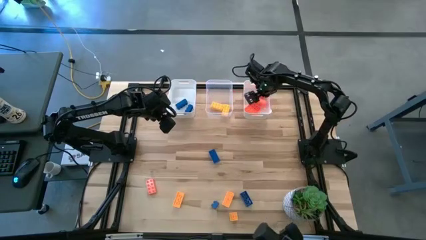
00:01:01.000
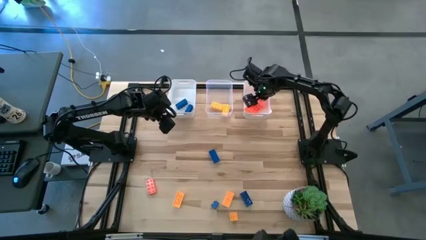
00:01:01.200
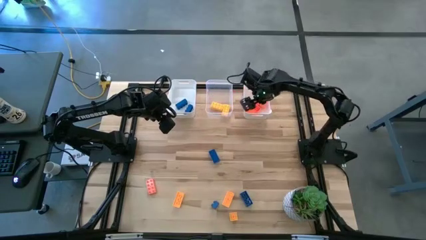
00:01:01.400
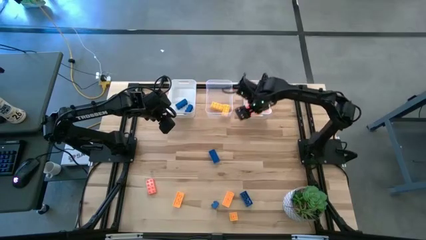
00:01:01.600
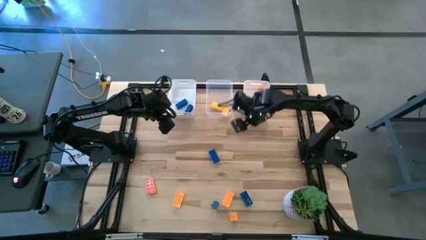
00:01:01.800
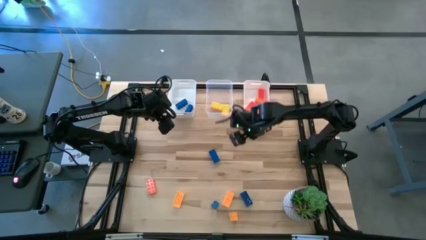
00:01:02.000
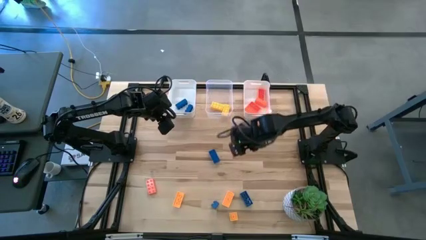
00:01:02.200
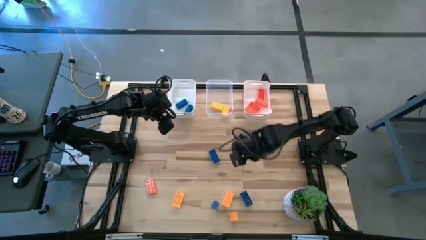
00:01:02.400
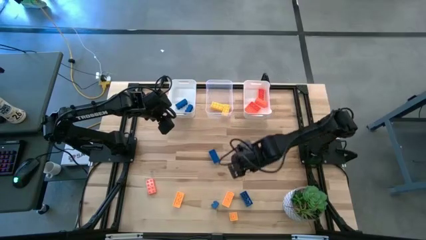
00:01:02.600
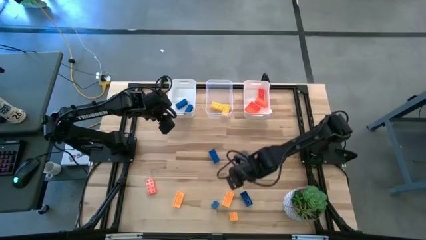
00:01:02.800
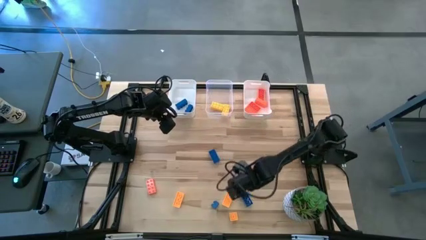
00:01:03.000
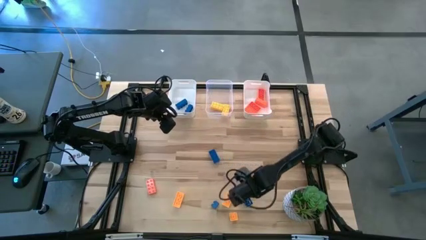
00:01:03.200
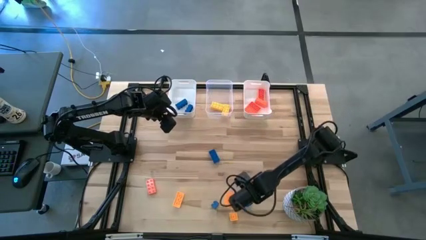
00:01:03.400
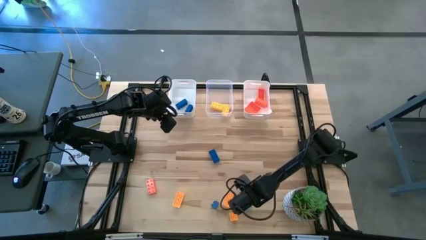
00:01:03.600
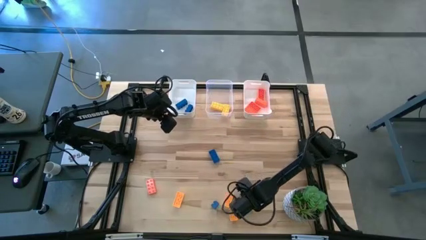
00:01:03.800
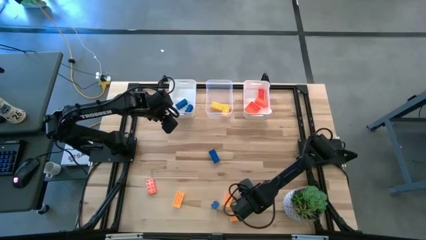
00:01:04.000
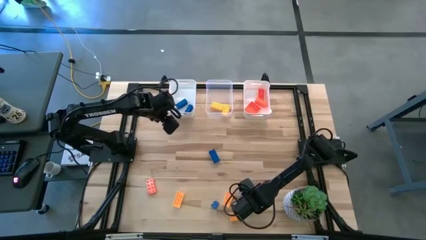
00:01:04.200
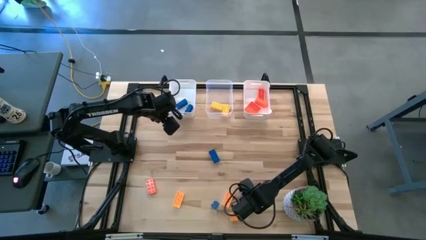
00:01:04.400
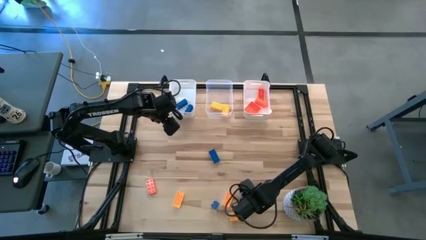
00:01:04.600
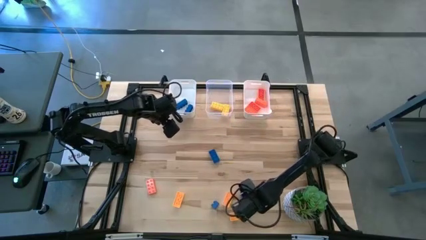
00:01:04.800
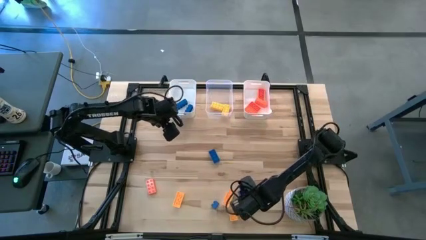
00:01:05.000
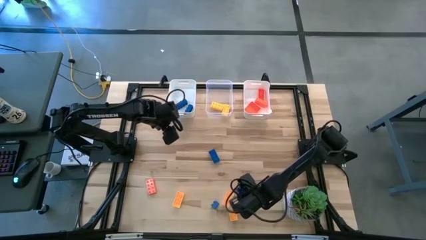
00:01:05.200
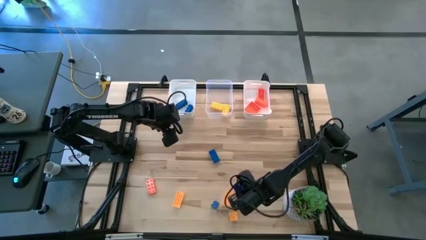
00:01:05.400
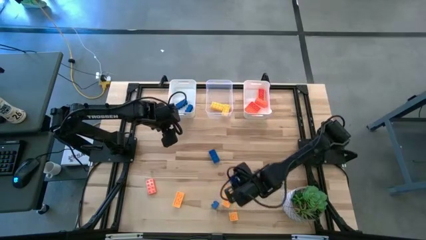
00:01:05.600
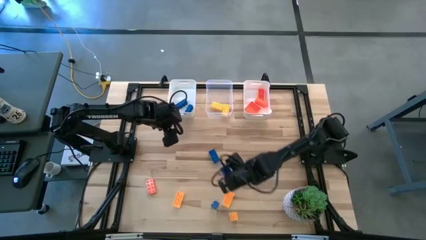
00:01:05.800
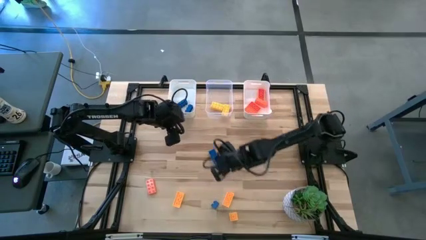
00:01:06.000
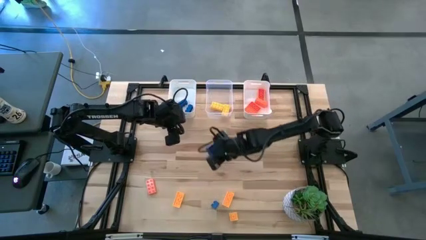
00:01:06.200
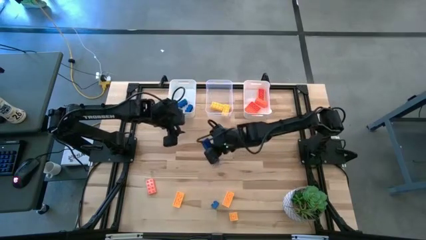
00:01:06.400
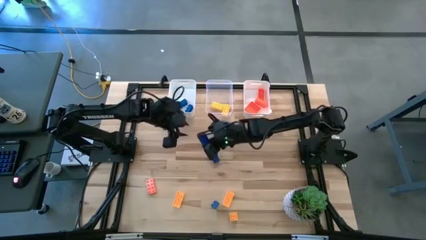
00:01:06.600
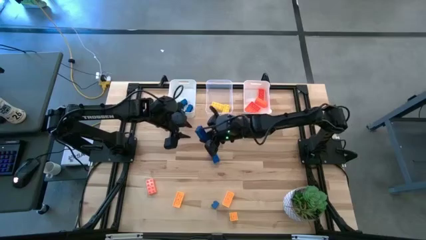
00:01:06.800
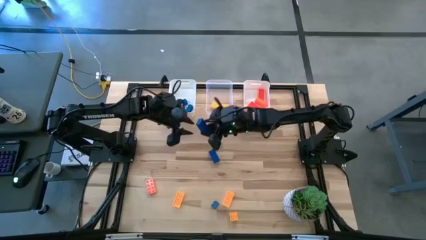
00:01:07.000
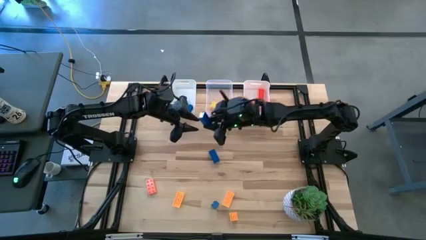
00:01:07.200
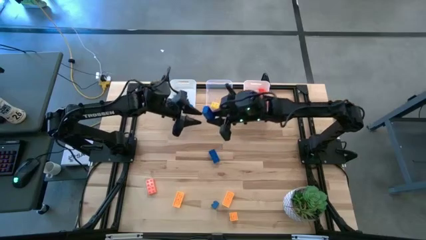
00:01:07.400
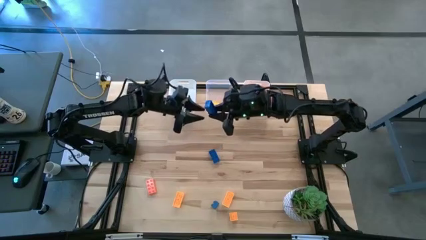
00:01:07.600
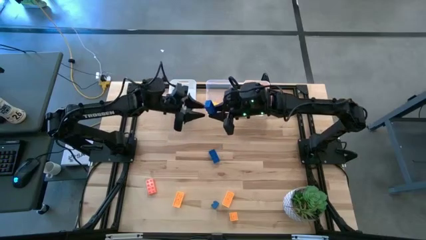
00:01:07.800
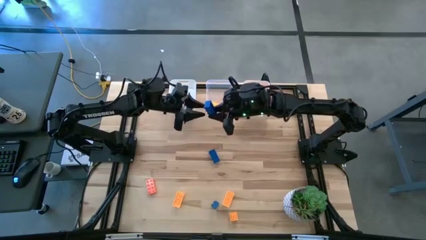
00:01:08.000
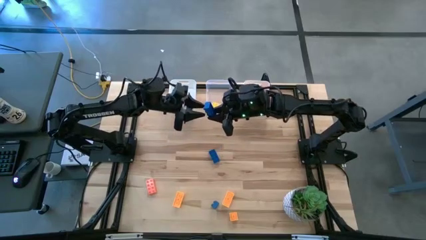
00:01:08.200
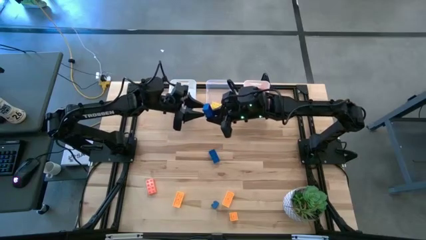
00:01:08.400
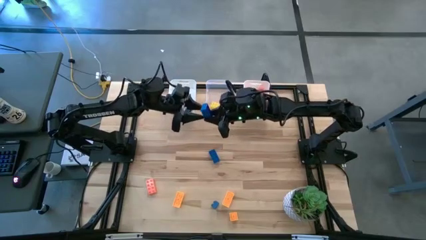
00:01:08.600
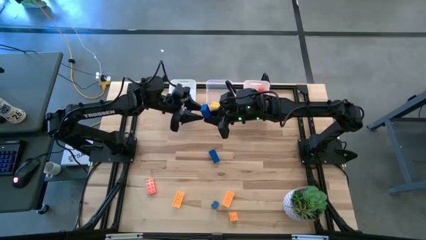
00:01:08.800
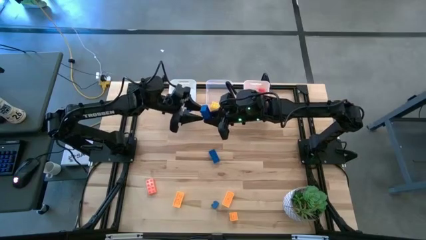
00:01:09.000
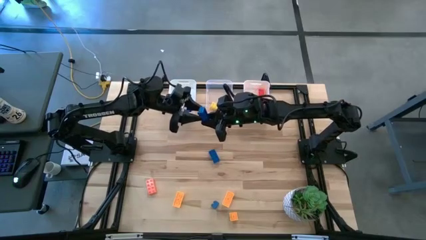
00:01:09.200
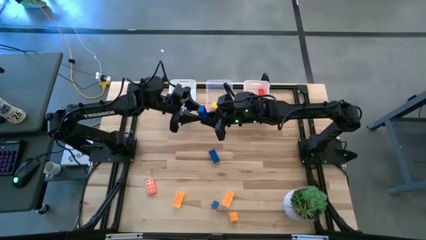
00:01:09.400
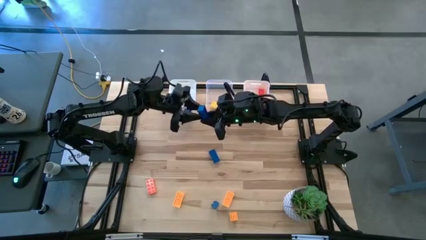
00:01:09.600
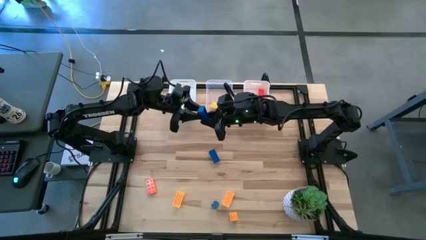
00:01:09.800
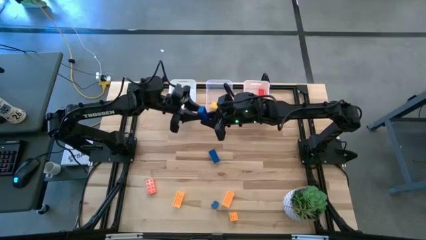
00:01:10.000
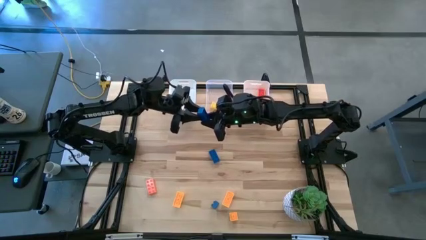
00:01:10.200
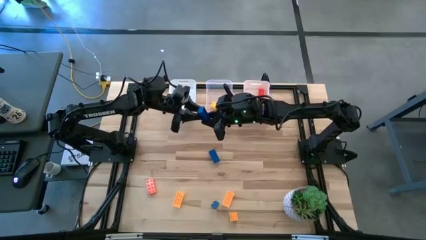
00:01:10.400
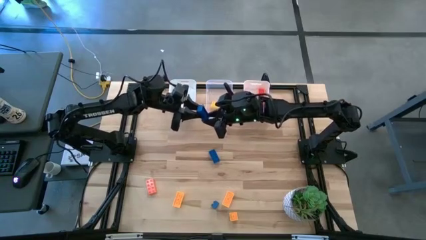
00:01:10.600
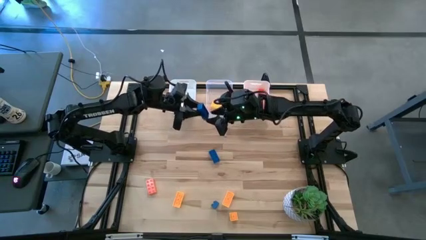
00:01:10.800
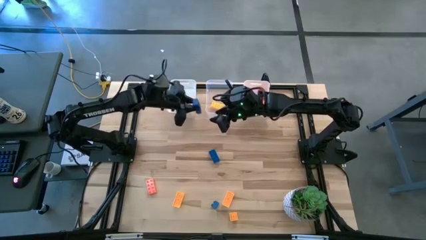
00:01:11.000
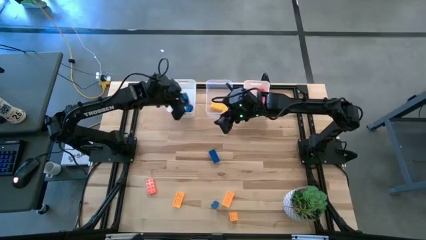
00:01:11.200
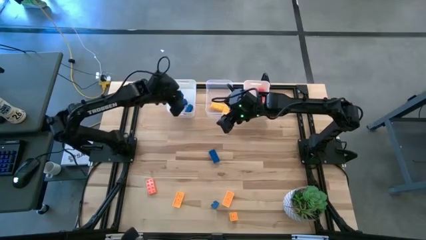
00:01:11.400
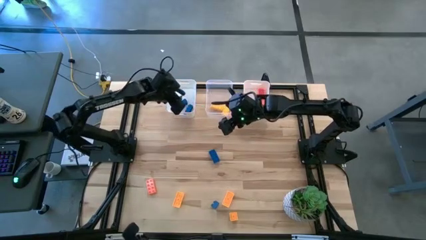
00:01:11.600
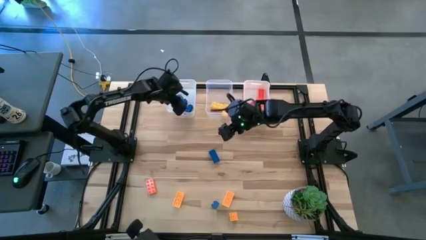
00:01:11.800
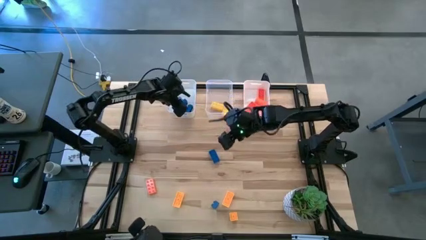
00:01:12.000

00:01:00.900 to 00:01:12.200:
Task: Sort & place blocks by color
Put the blue game piece into the left white bin

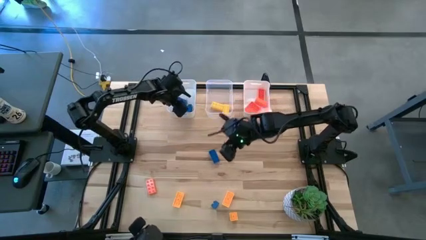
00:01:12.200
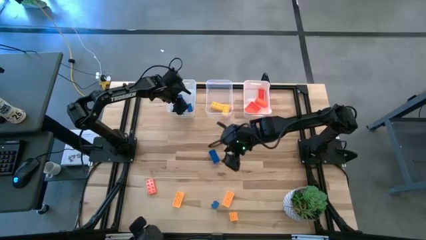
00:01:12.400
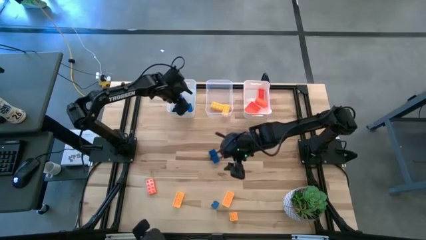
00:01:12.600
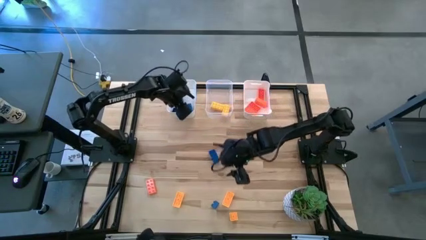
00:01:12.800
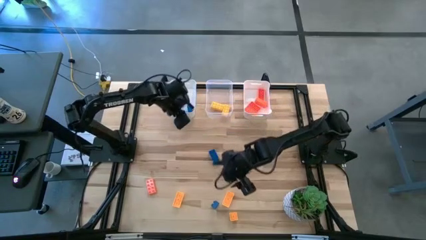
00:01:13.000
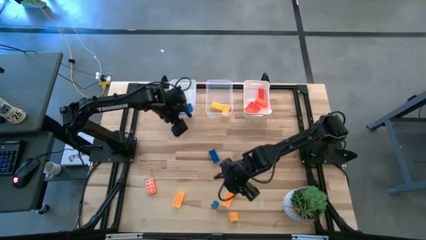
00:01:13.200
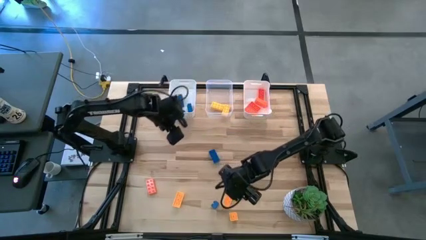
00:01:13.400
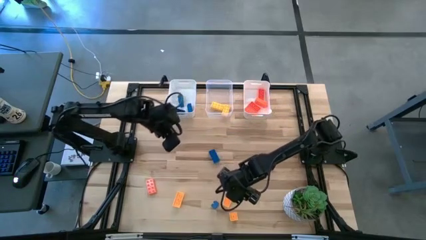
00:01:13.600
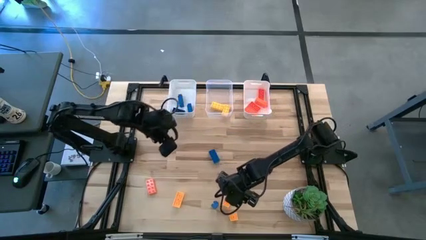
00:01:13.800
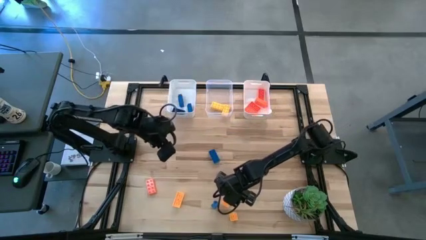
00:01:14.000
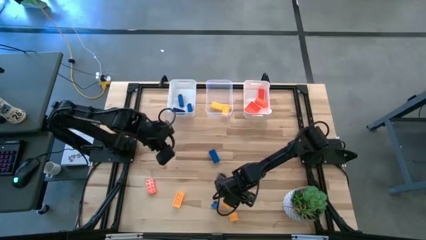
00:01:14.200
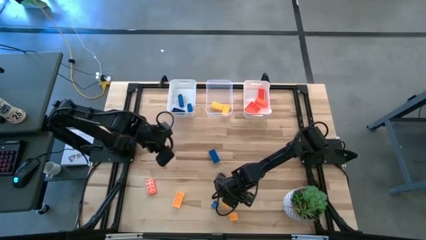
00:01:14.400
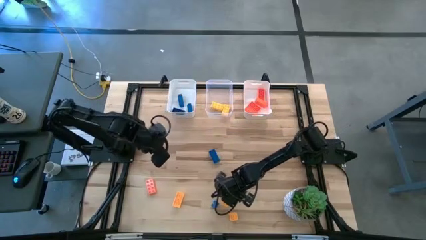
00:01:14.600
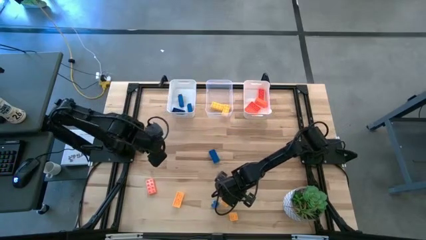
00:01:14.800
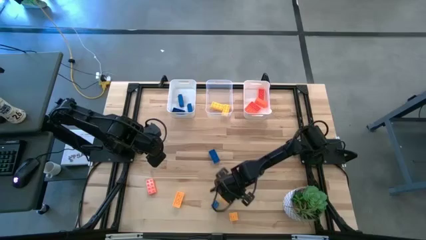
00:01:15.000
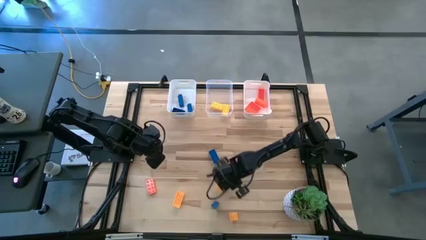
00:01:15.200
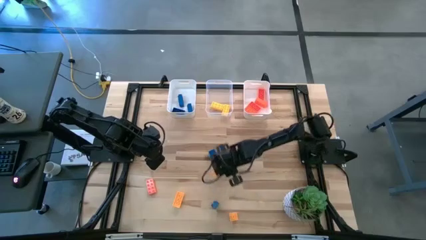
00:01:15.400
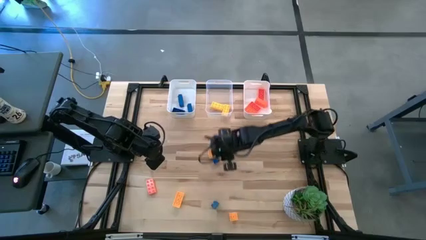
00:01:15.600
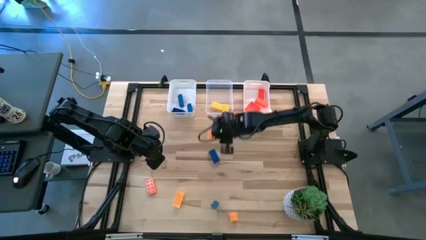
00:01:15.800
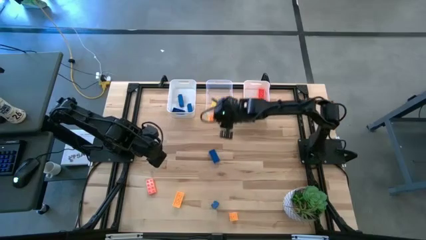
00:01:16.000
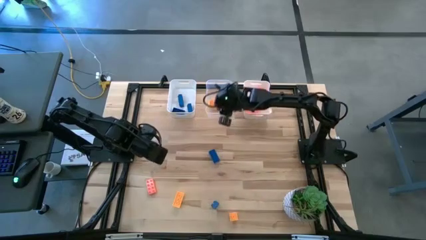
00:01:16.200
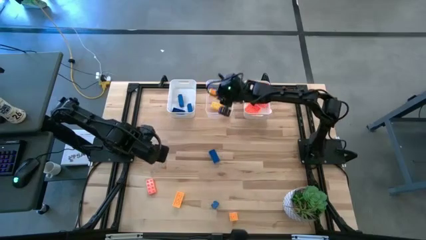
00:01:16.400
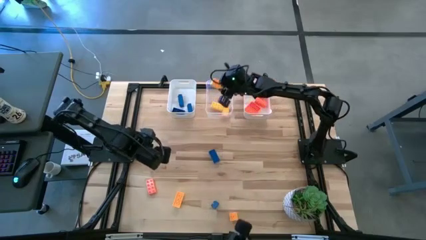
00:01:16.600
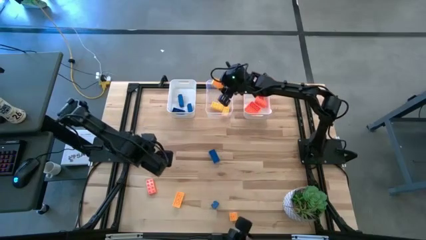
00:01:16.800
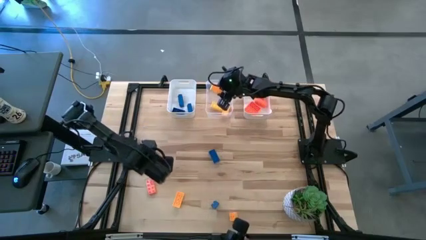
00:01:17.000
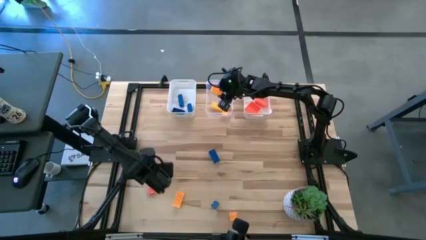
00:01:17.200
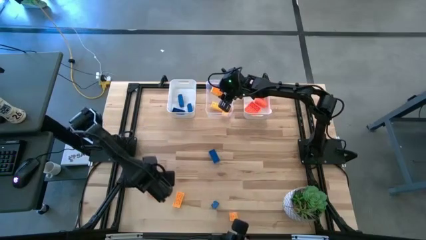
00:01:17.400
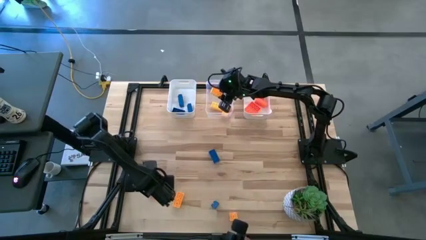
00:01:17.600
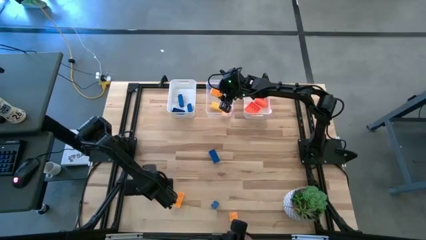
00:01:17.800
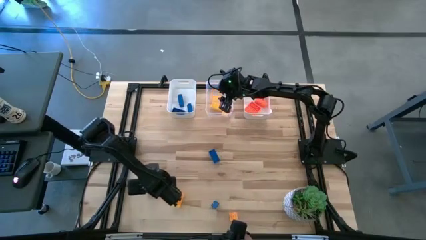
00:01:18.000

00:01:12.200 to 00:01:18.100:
Put the yellow game piece into the transparent bin
